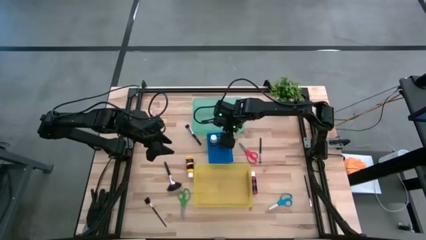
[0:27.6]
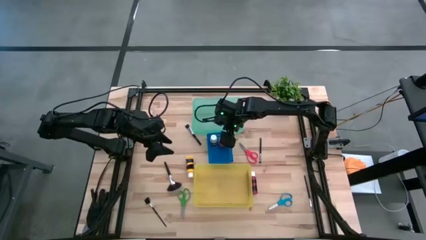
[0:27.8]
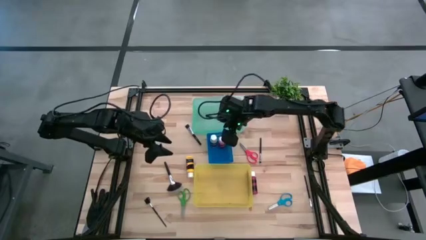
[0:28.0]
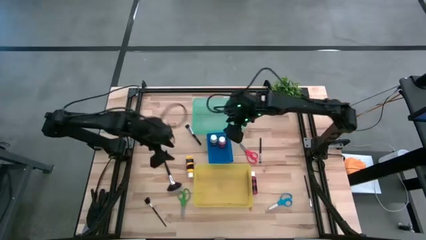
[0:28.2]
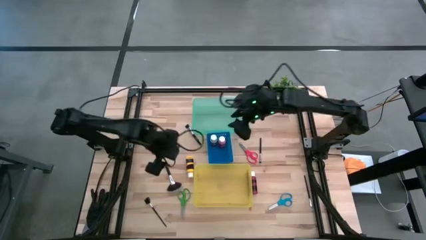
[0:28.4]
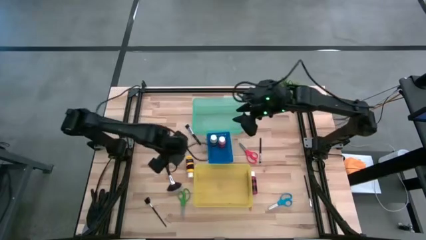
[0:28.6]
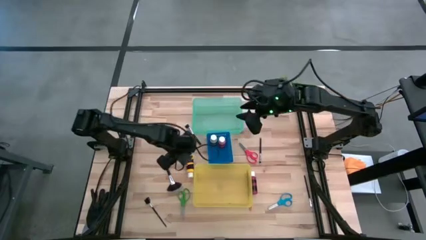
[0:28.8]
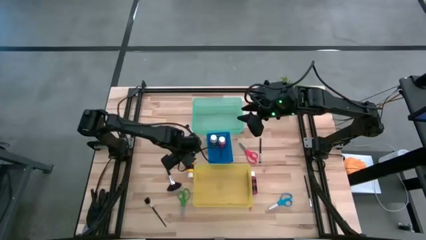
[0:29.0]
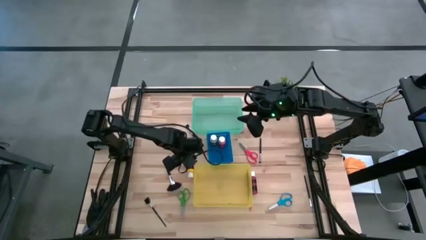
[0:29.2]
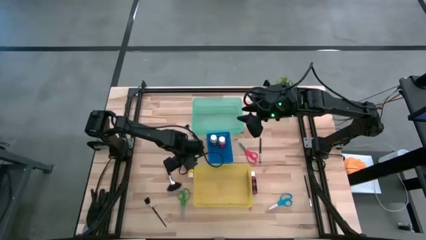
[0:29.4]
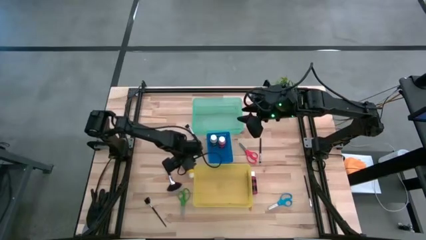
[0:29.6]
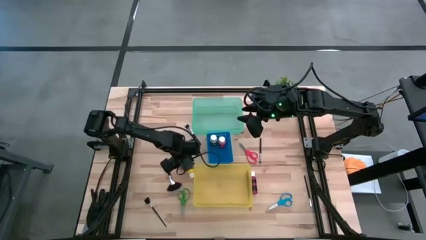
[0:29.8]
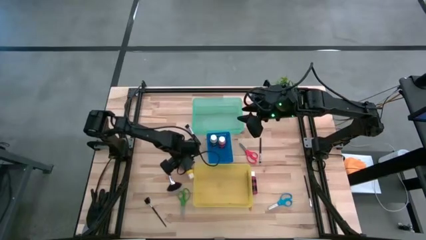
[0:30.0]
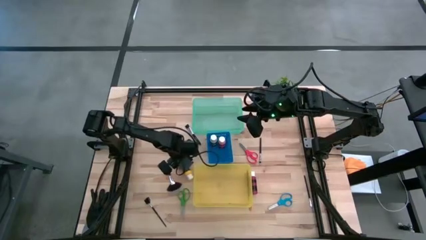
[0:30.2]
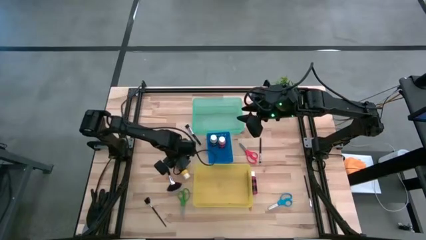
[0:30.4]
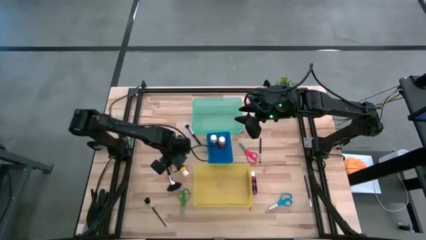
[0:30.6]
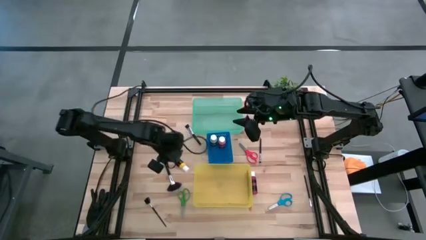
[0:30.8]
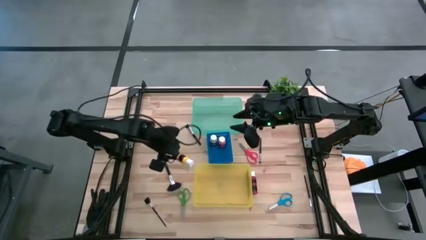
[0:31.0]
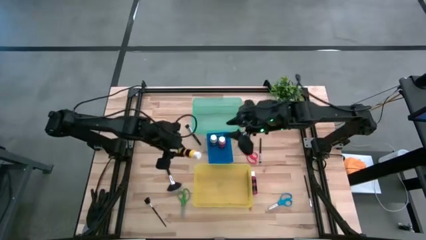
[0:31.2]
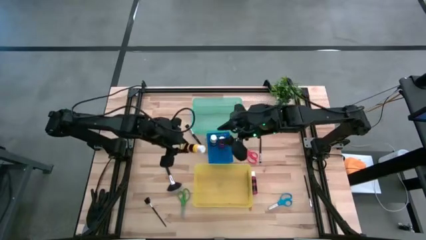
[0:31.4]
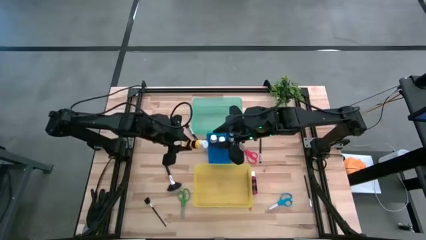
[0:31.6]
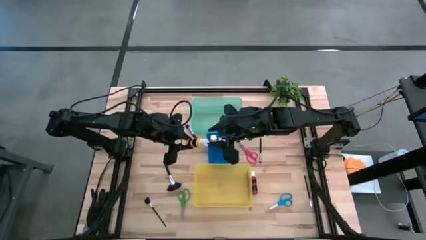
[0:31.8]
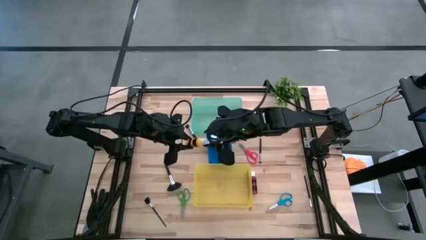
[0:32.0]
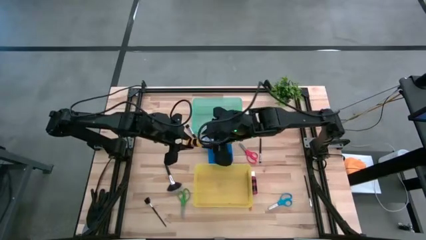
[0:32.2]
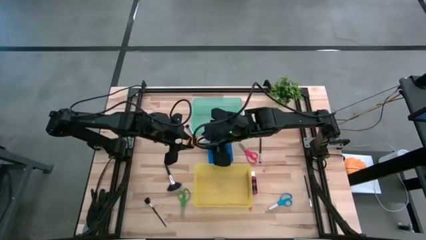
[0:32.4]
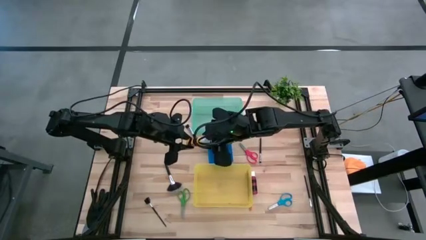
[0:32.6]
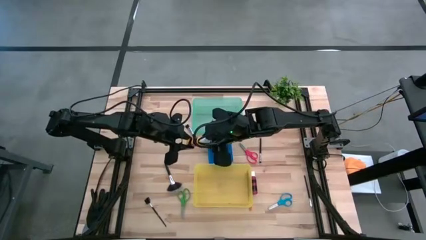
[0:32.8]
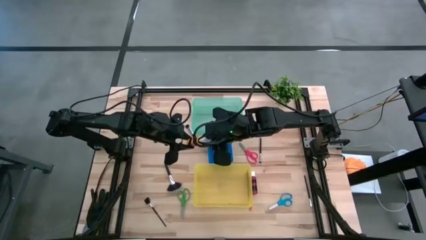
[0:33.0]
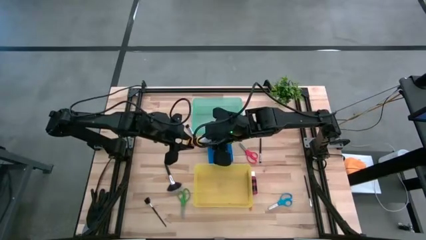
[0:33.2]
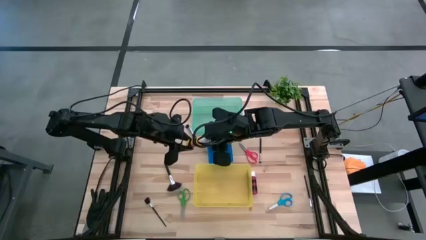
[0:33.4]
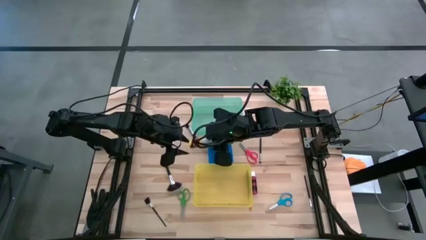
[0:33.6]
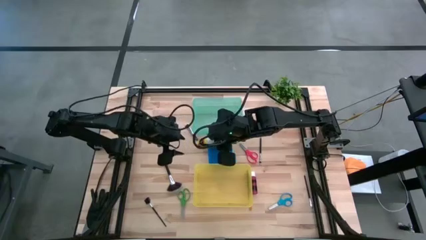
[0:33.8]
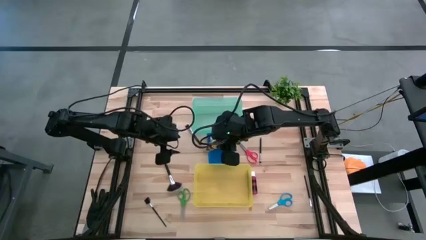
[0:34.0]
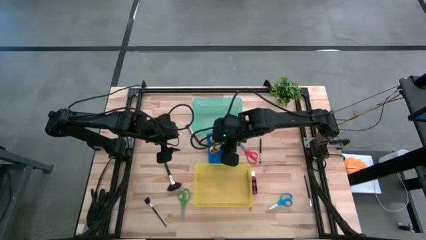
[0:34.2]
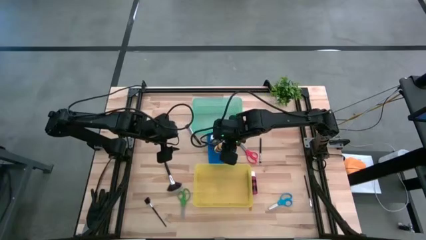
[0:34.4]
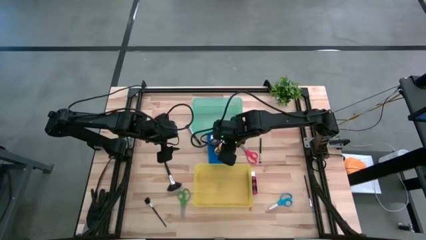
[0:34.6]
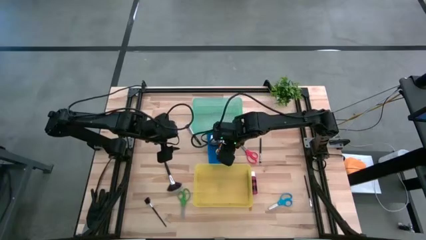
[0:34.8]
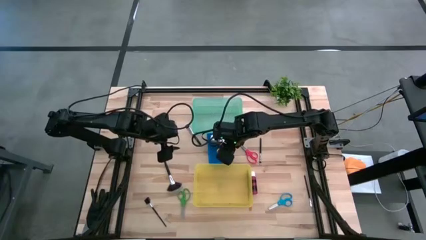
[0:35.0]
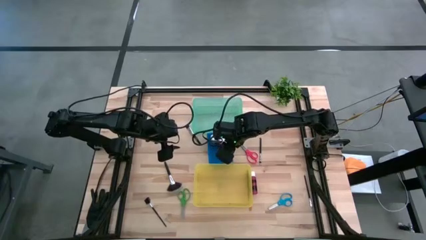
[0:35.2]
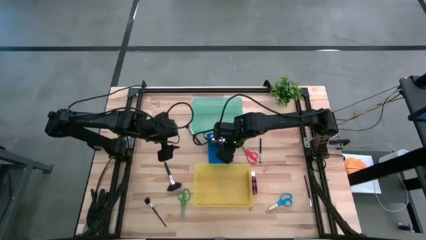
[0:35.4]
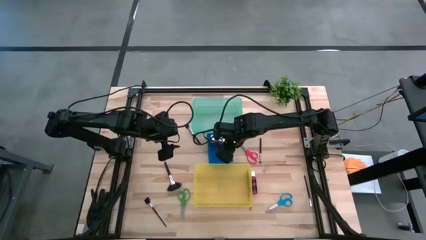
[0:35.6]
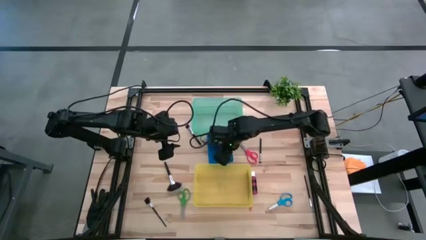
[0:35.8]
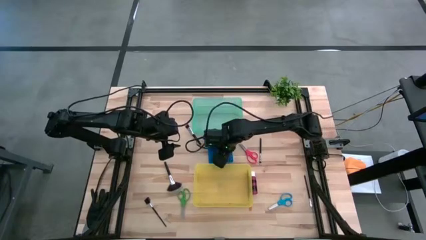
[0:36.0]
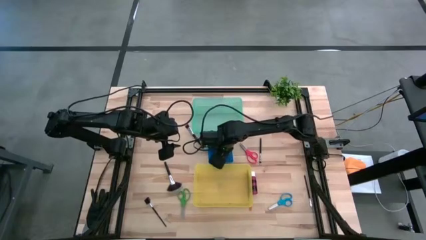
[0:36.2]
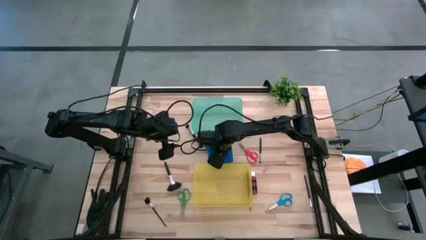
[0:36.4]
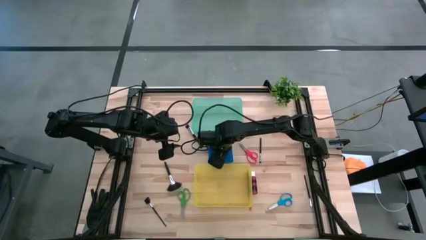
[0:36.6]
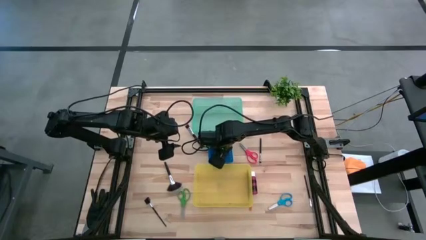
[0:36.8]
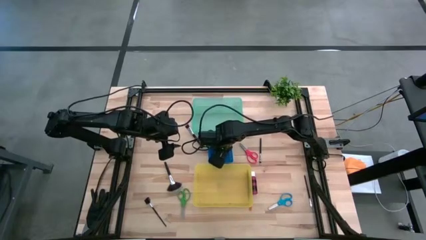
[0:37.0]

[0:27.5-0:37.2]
Task: Pick & Place Paint Supplies
Put the yellow paint bottle into the blue bin

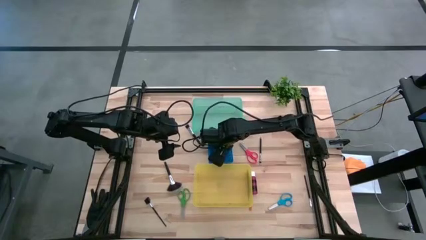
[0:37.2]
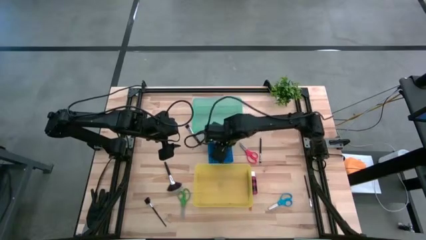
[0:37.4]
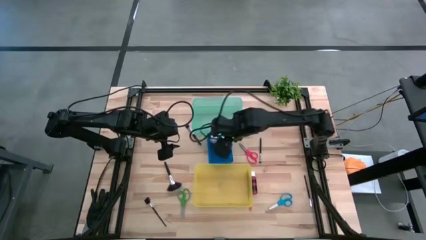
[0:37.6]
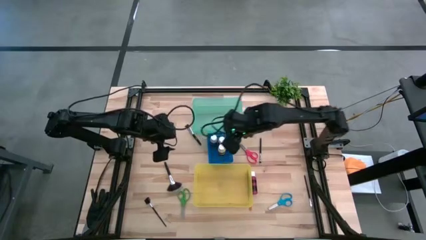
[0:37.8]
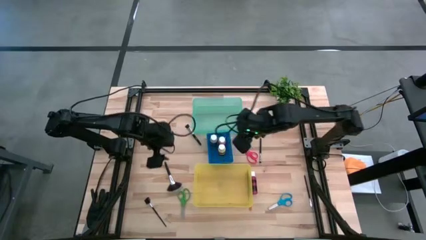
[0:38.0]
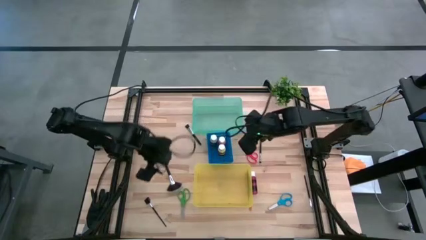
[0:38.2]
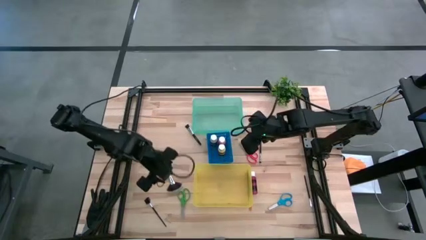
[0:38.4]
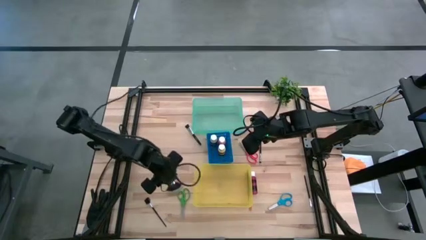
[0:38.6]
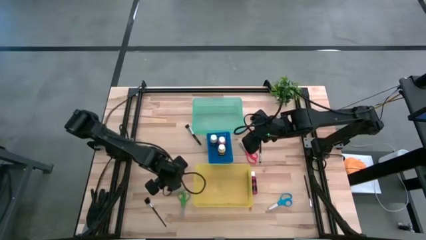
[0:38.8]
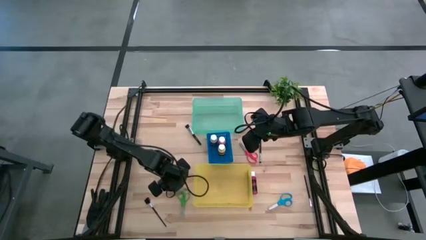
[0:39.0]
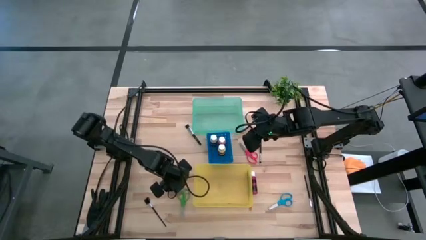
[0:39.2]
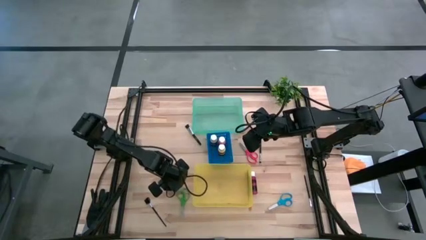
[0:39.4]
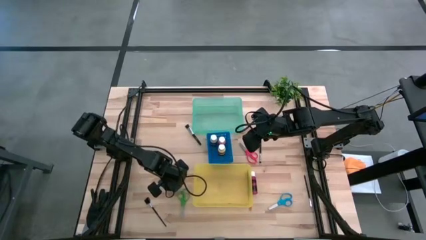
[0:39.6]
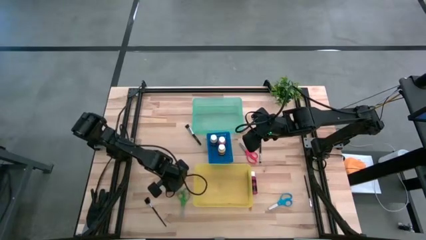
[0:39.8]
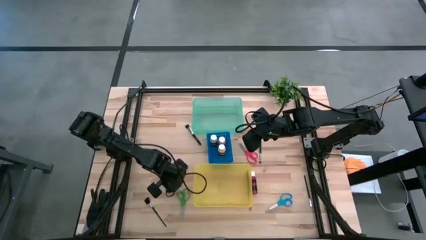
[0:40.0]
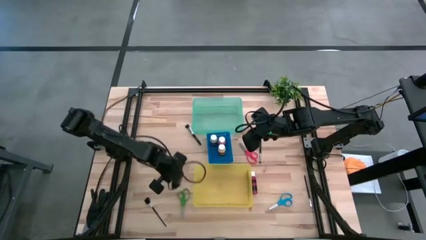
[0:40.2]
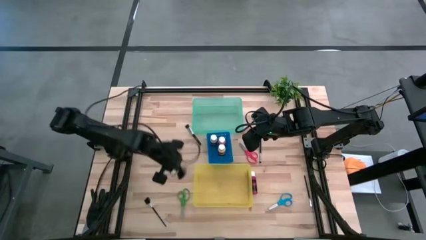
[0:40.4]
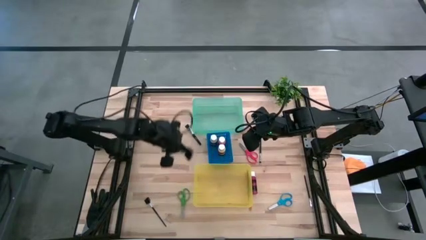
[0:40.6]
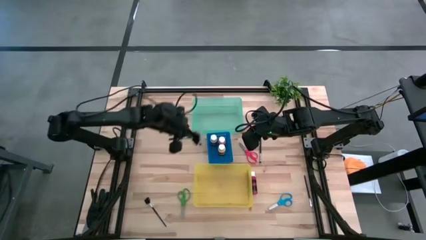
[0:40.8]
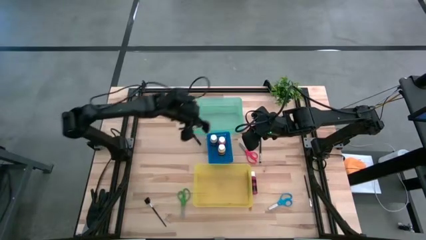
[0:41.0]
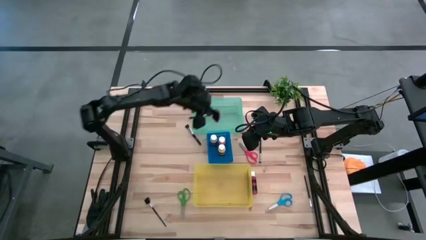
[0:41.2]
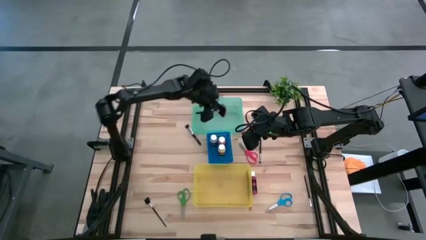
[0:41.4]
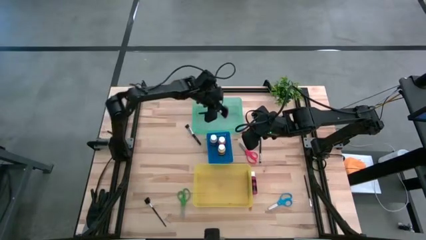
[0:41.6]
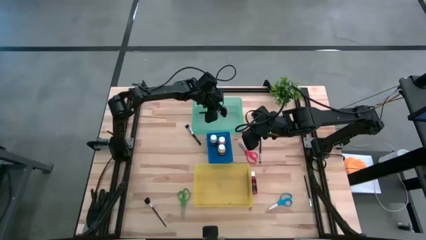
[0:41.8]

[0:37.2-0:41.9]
Put the black highlighter brush into the green bin

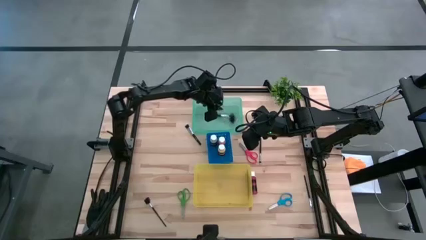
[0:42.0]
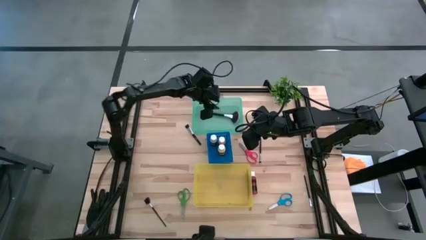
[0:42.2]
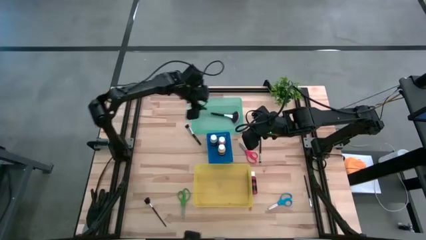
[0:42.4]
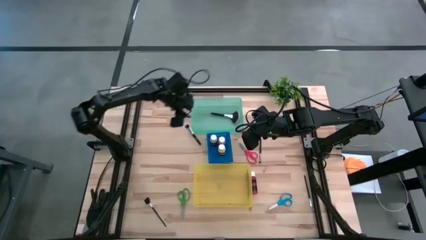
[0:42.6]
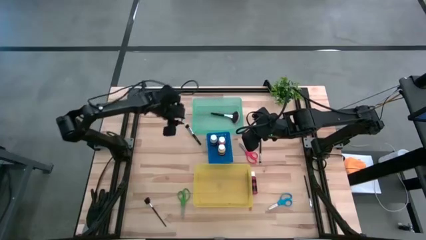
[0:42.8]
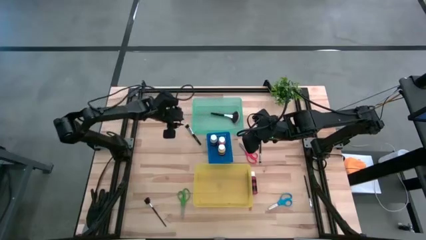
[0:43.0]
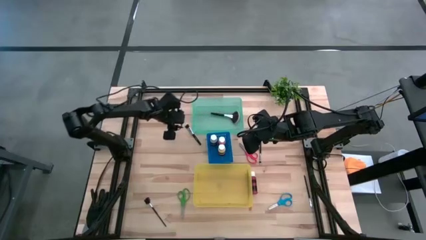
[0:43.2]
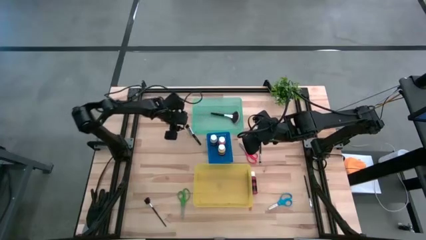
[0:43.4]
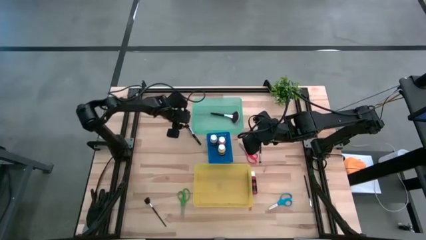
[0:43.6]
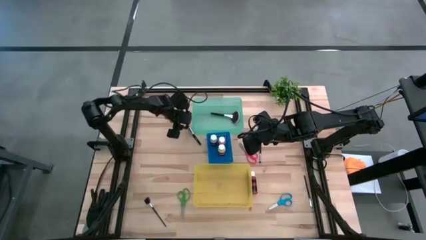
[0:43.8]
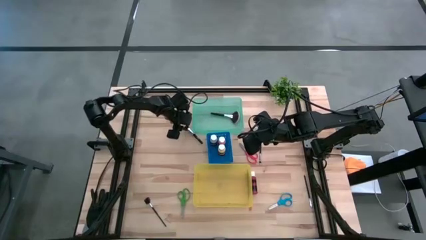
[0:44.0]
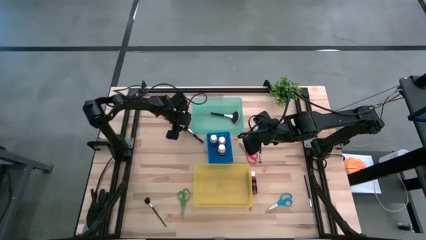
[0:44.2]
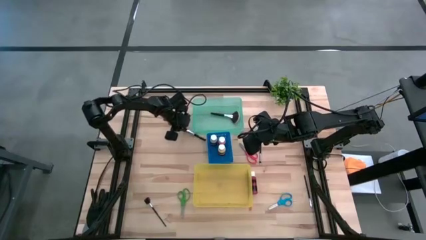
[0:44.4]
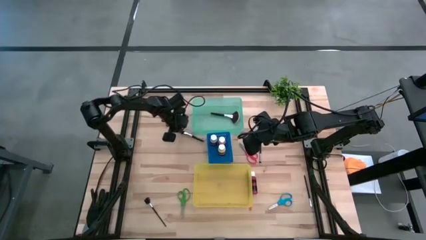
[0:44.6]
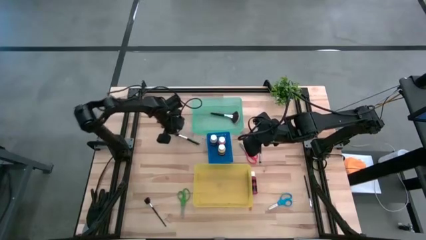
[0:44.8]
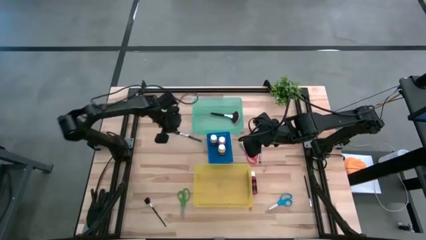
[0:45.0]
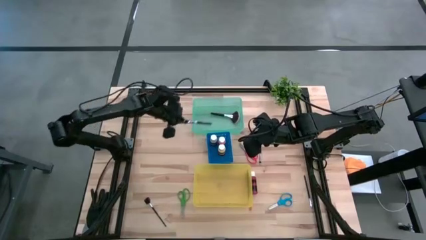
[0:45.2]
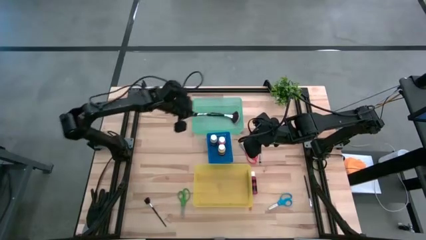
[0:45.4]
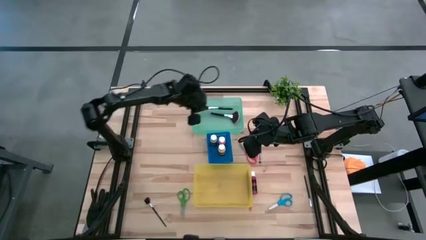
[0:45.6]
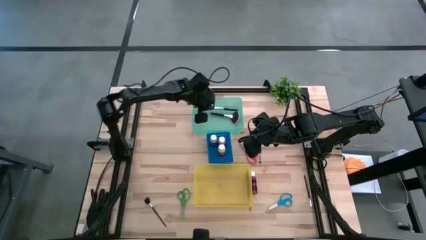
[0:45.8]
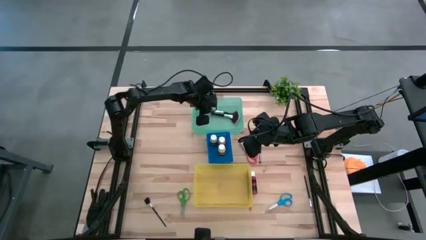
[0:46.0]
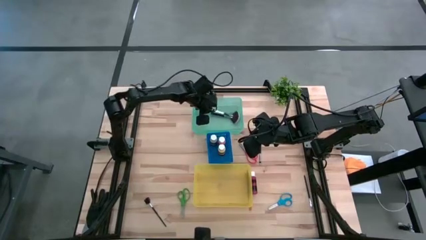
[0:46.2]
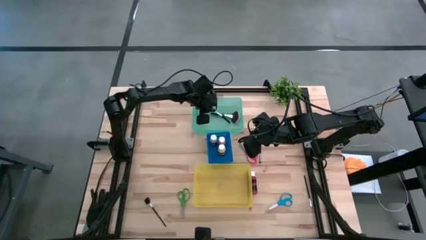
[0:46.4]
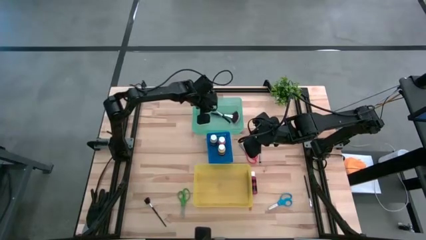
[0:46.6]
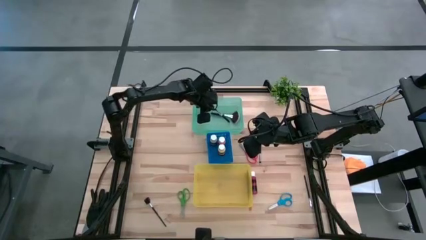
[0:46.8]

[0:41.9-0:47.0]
Put the black foundation brush into the green bin
